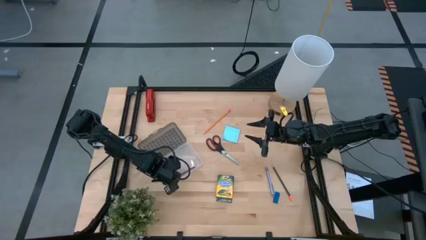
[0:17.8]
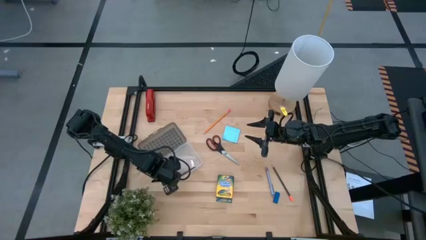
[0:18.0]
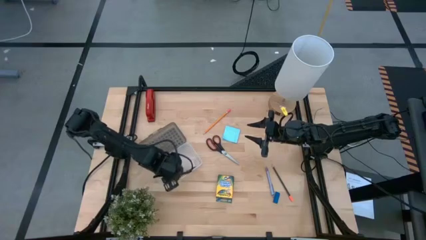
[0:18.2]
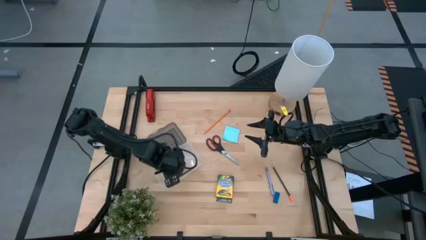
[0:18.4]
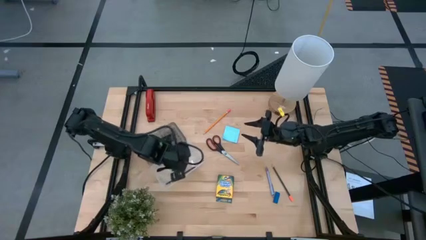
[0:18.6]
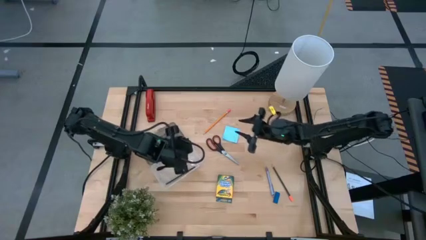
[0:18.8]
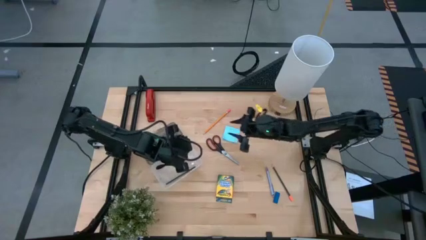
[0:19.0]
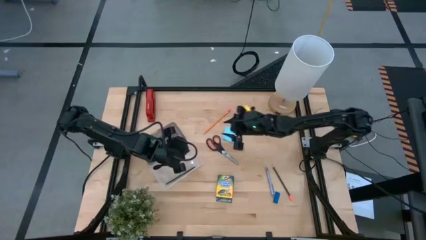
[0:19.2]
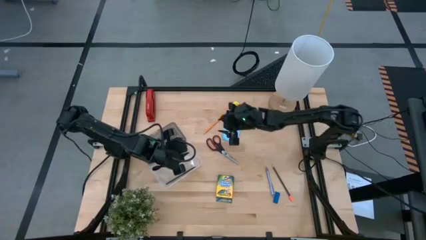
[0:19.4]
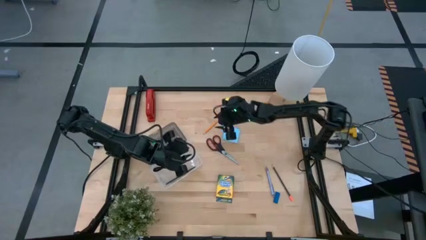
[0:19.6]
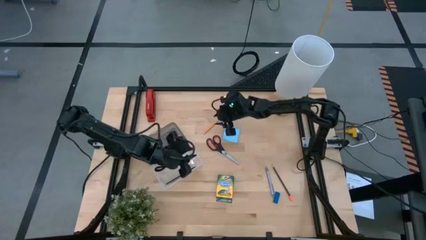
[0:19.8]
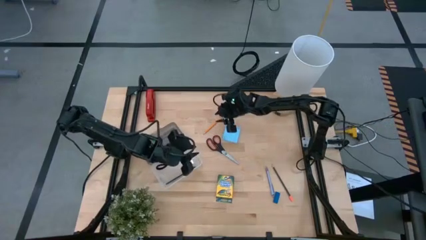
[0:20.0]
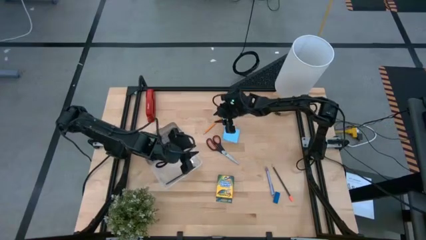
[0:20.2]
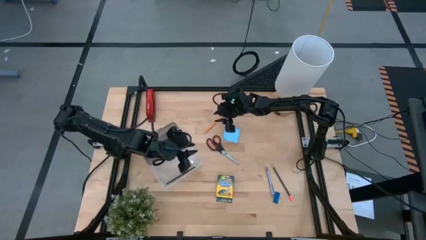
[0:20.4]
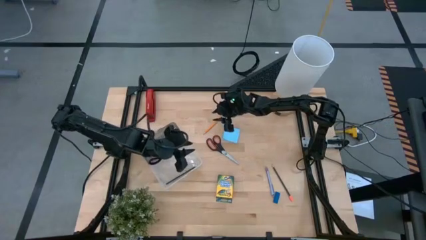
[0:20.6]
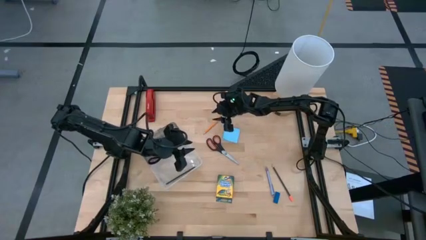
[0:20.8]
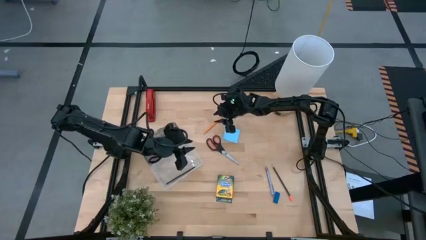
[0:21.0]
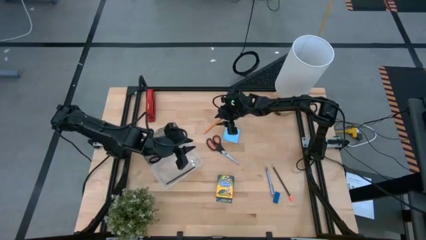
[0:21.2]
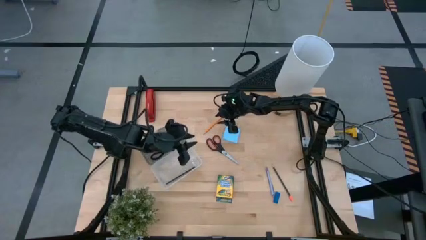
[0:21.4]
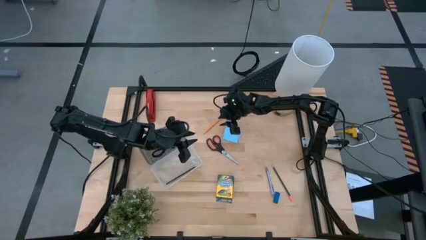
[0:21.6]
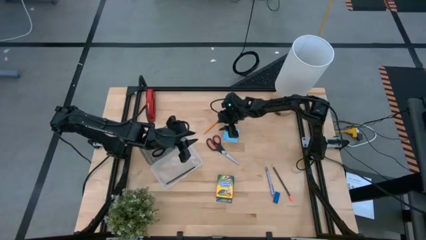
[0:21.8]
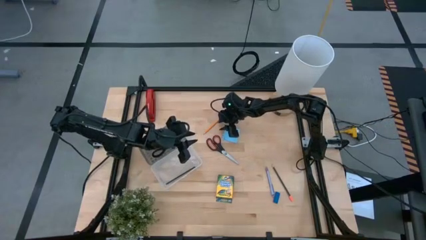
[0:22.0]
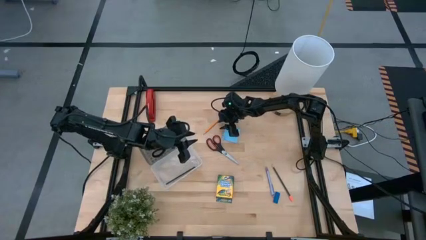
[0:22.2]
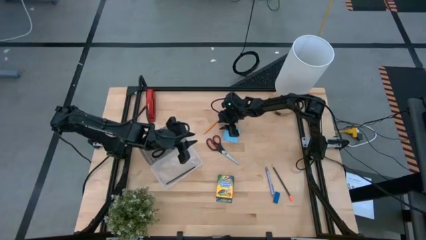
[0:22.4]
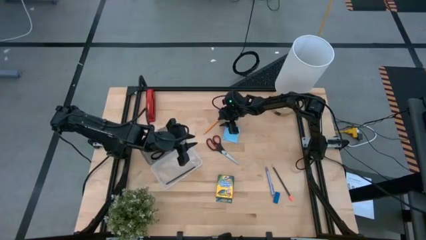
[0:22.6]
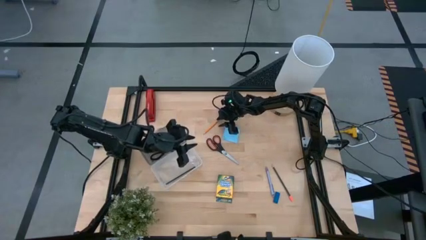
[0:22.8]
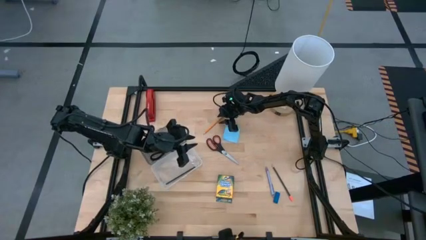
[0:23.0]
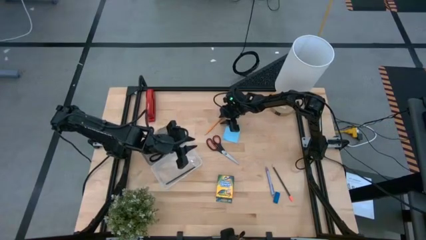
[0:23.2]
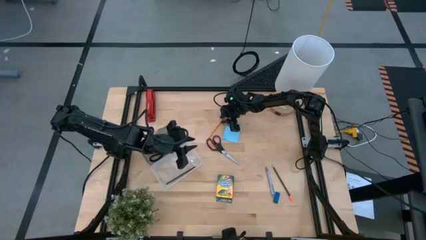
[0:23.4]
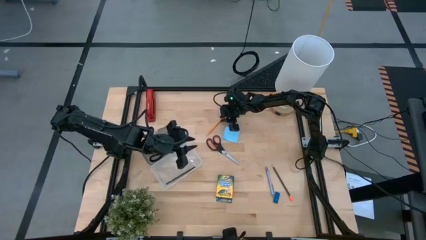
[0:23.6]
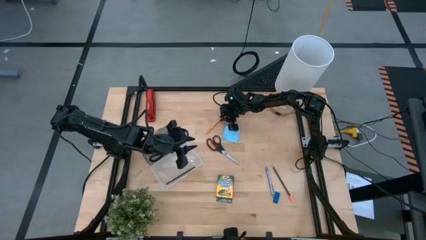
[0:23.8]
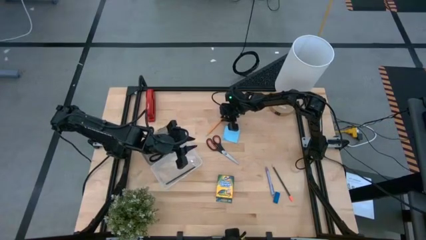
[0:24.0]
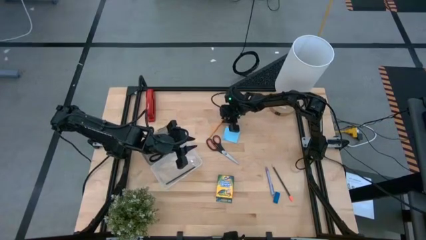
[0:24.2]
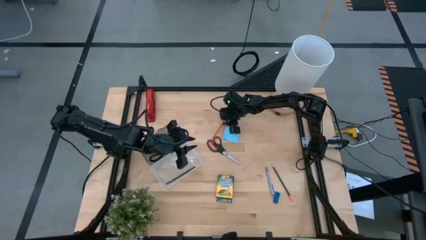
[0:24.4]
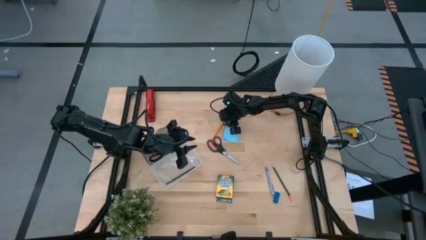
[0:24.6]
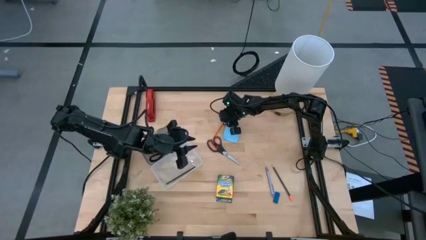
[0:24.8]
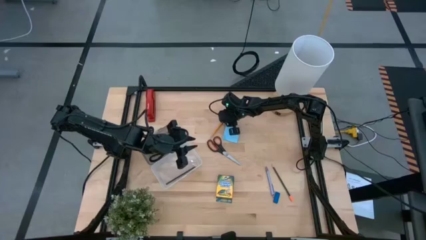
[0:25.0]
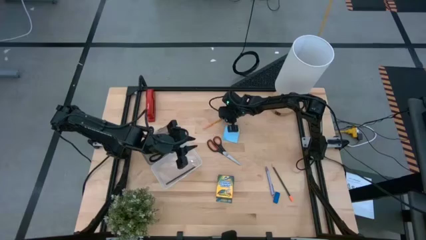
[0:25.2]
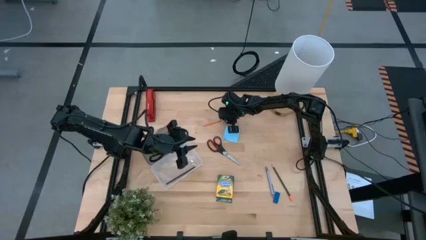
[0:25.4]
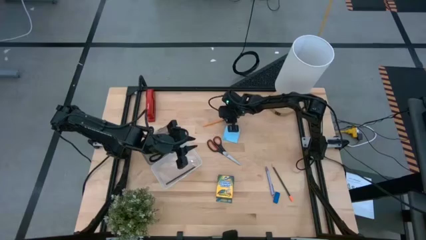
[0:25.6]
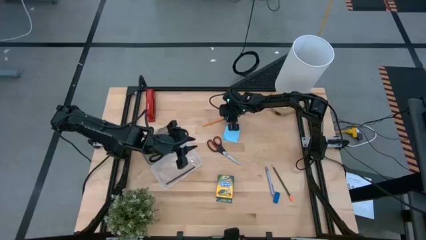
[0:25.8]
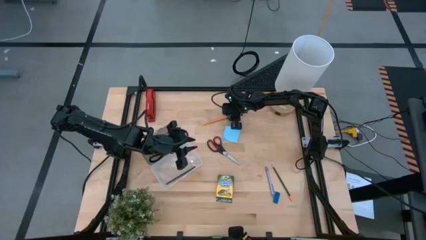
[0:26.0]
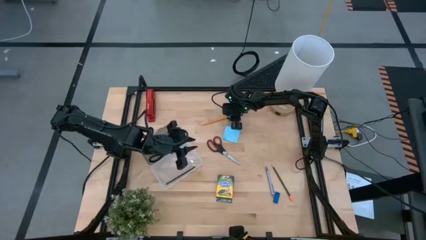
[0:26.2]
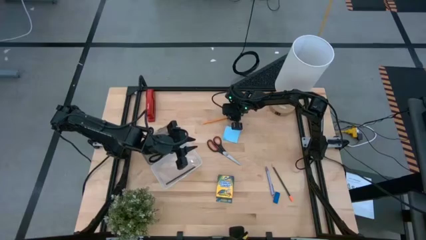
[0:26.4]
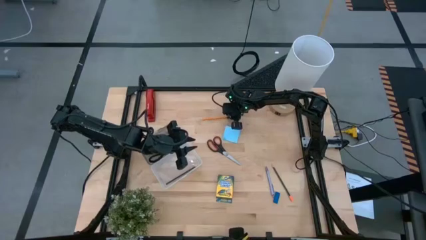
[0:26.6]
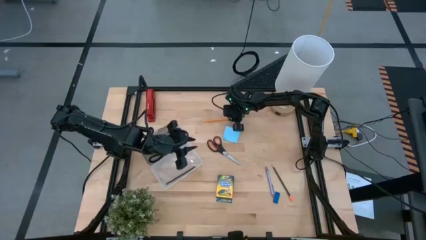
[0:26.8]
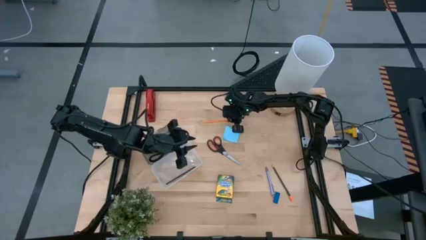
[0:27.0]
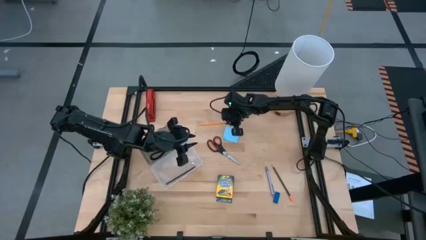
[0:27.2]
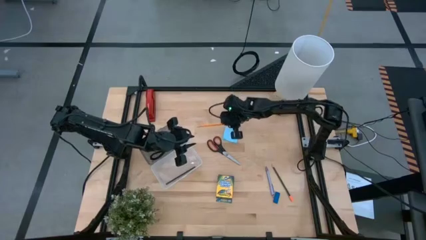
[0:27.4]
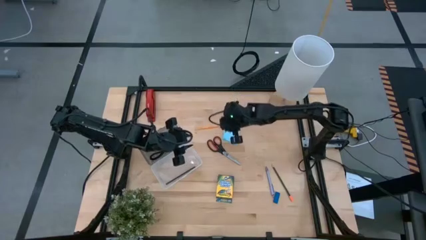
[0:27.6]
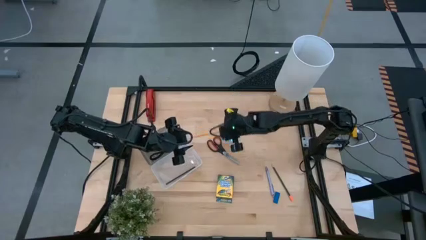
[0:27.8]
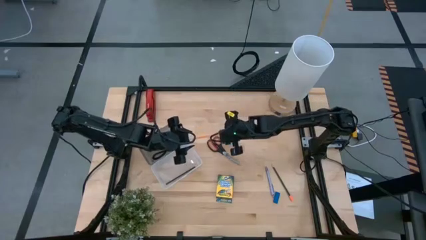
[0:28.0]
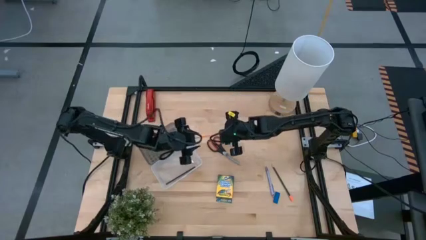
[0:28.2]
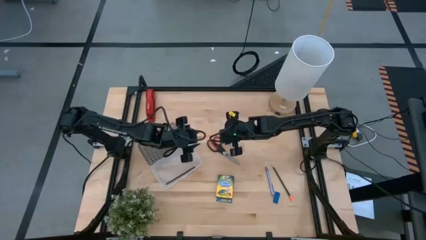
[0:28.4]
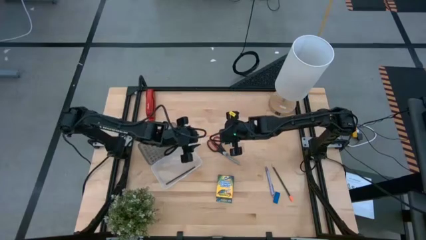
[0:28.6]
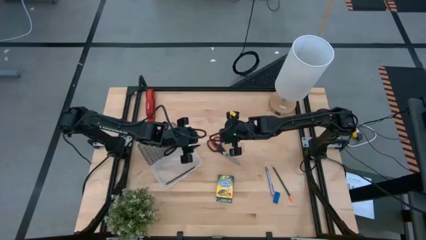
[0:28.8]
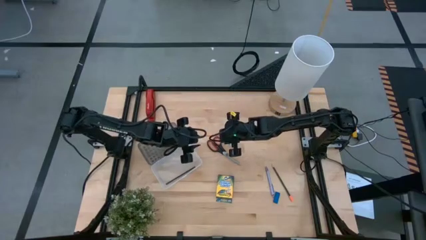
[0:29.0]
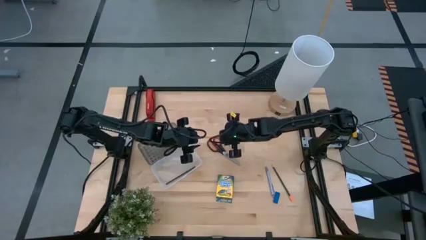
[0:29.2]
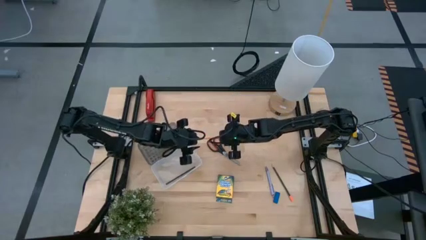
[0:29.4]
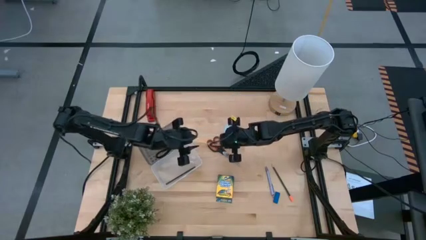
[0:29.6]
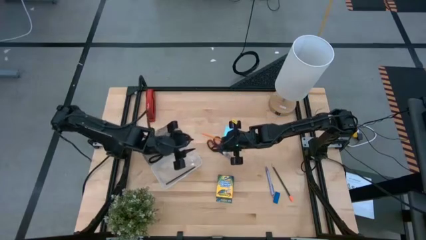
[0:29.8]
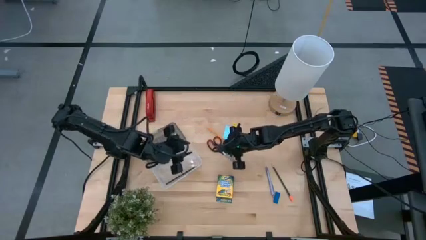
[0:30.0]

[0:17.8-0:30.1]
Task: Pack school essentials
Put the yellow pencil into the supply box

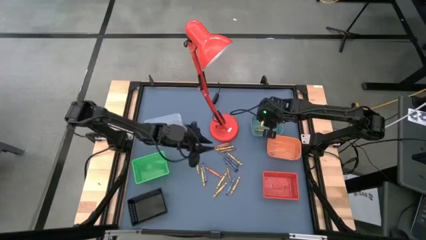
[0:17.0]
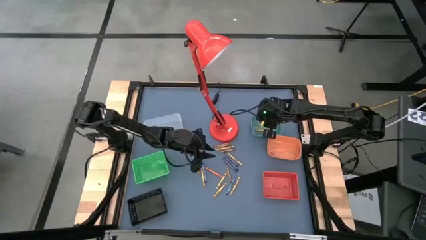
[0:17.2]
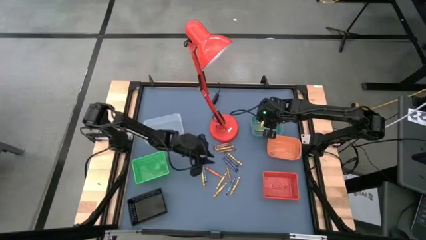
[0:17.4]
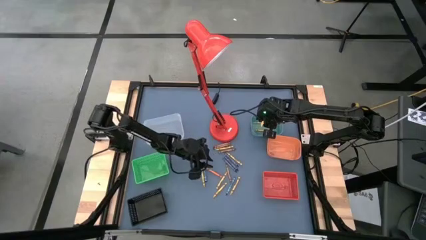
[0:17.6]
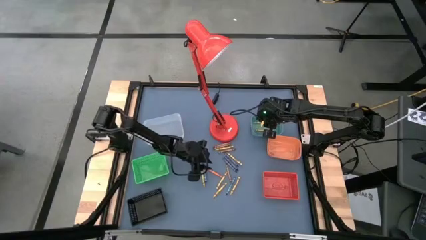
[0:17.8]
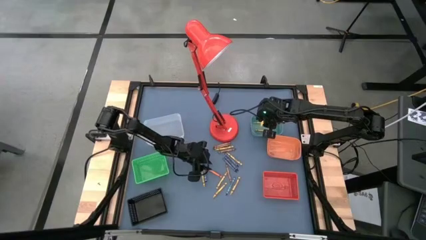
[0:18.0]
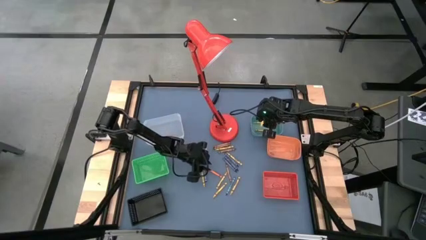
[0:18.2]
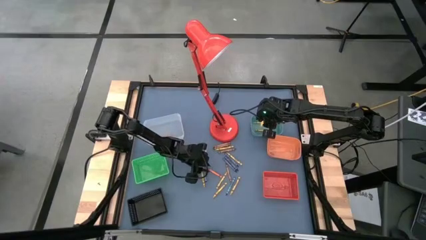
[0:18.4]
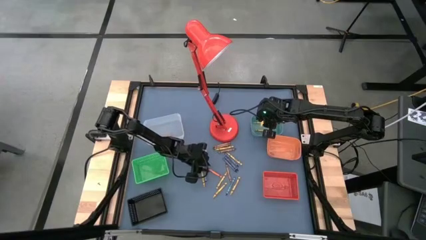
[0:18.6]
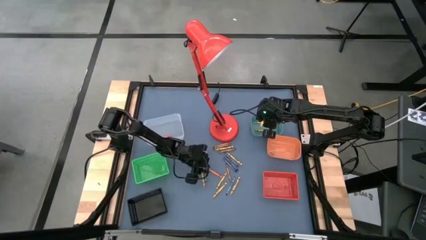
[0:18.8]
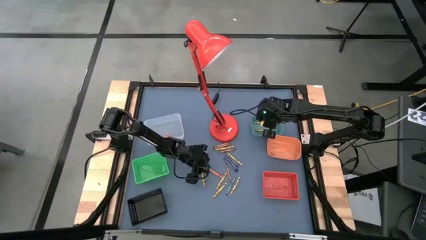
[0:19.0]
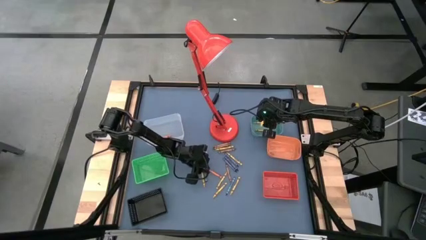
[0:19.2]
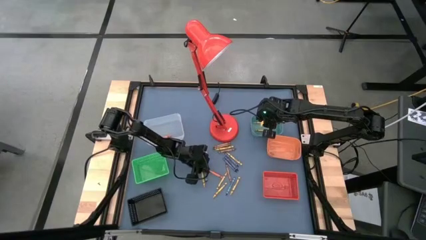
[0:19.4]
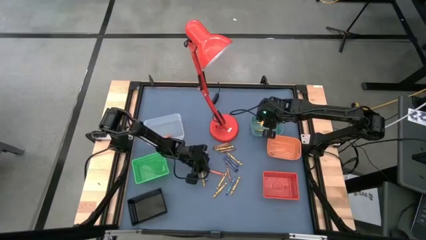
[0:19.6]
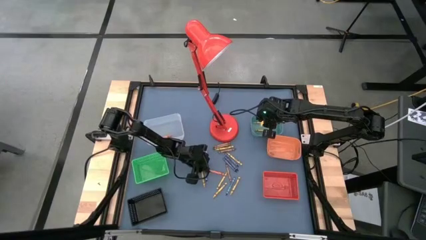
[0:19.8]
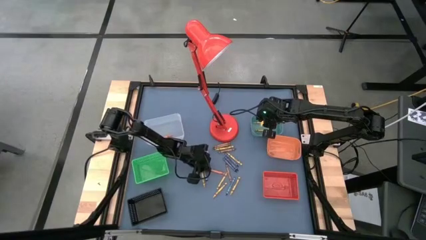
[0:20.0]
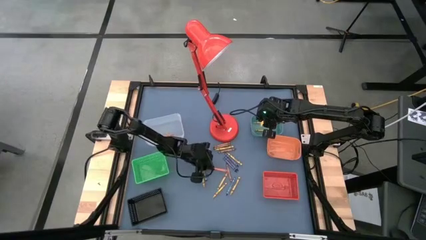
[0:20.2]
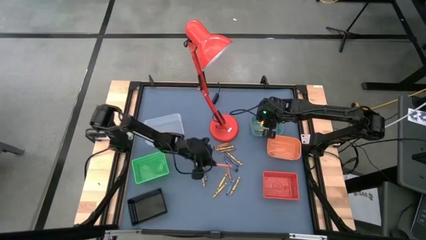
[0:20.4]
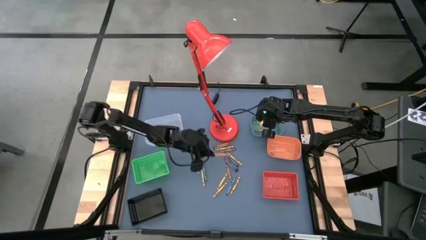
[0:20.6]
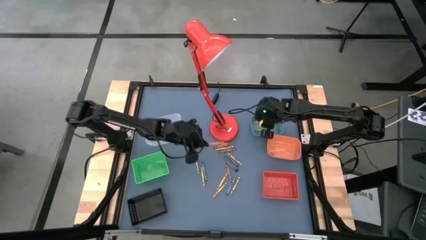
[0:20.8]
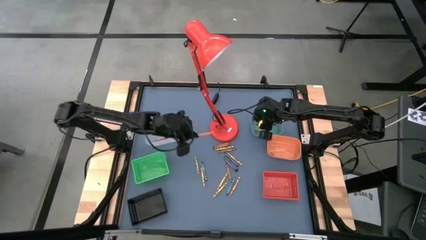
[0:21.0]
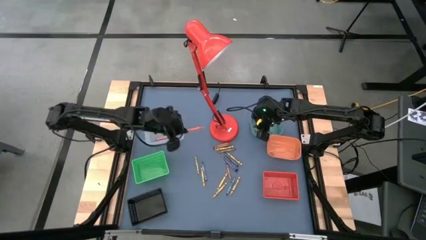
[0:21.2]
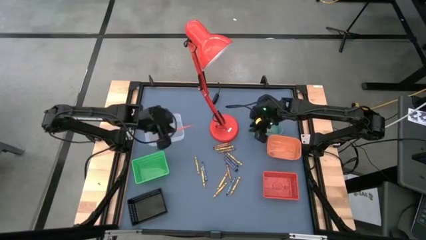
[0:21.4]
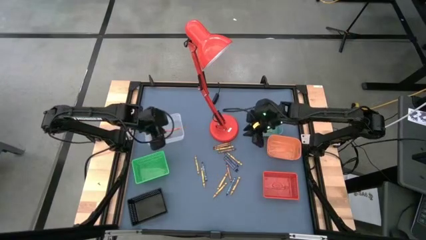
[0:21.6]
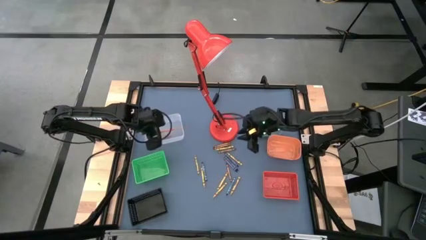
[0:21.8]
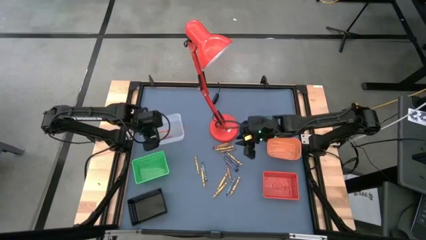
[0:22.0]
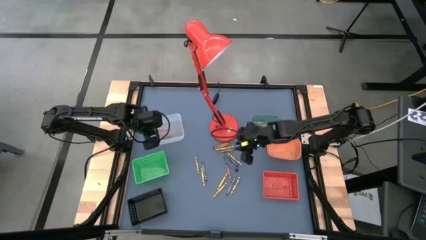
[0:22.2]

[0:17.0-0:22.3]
Task: Sort crayons
Put the orange crayon into the white bin
